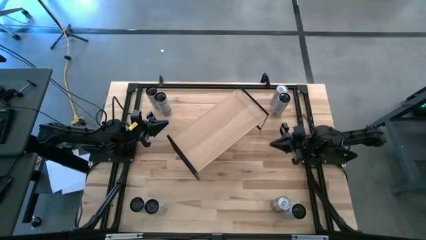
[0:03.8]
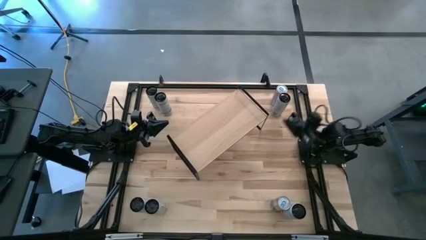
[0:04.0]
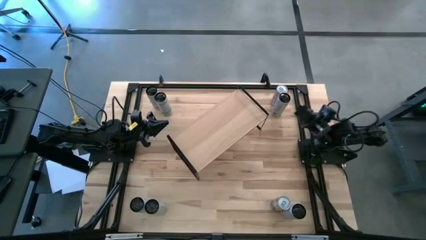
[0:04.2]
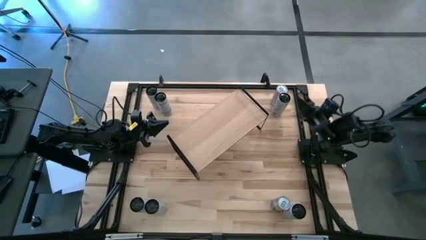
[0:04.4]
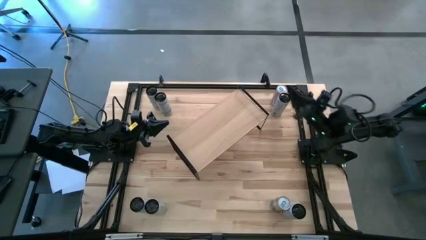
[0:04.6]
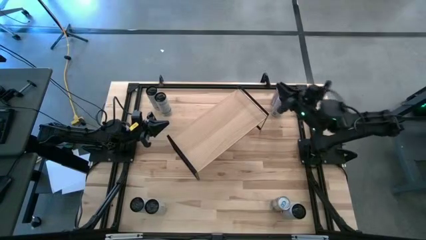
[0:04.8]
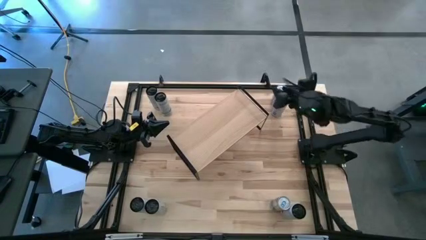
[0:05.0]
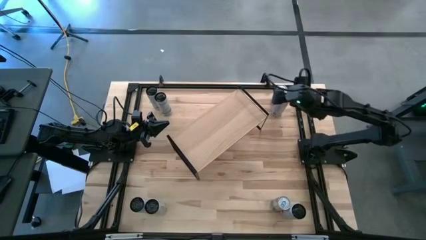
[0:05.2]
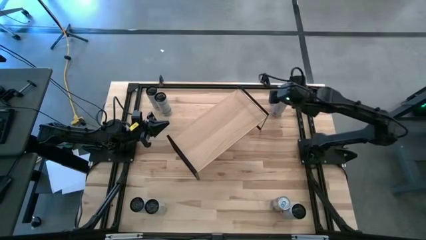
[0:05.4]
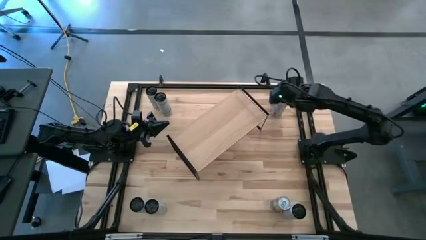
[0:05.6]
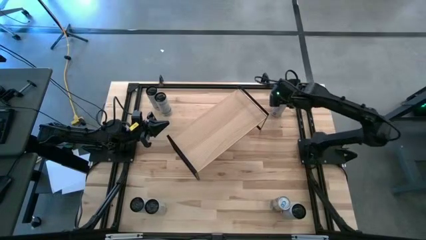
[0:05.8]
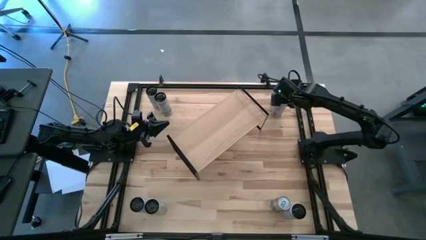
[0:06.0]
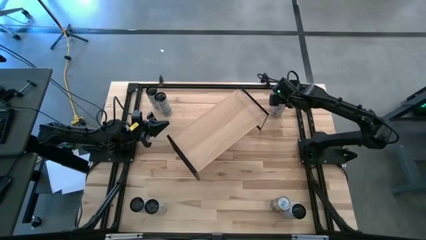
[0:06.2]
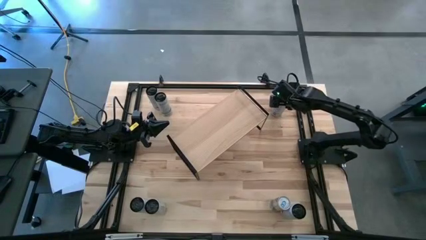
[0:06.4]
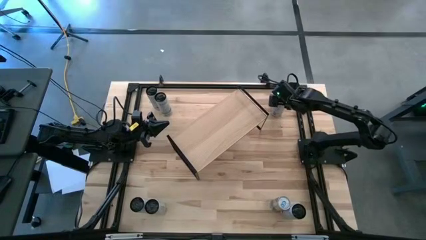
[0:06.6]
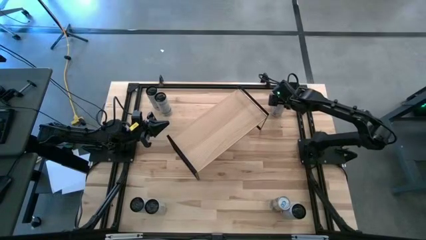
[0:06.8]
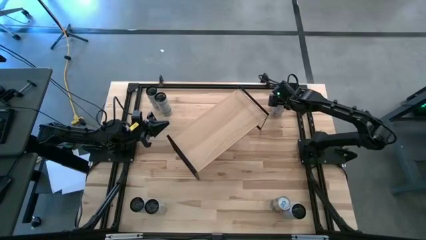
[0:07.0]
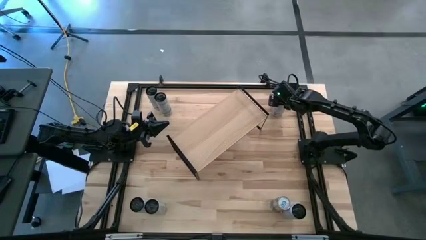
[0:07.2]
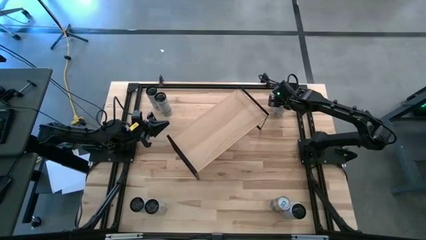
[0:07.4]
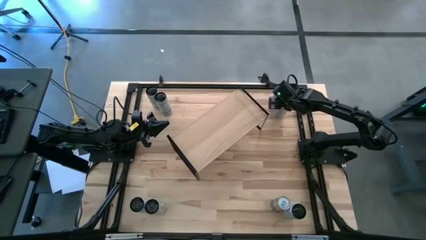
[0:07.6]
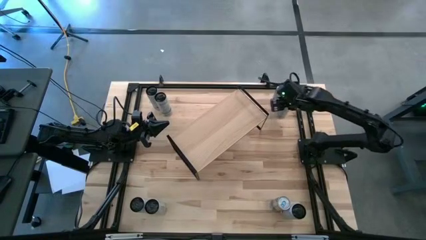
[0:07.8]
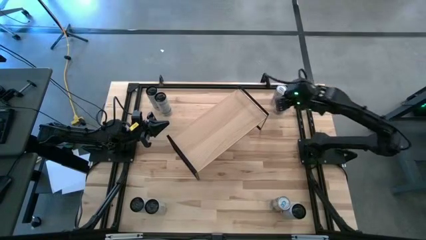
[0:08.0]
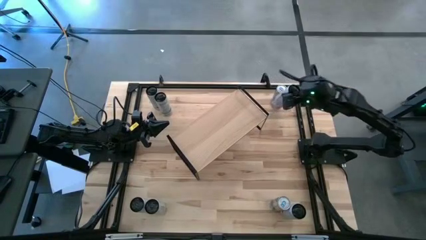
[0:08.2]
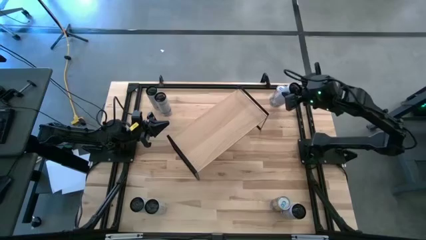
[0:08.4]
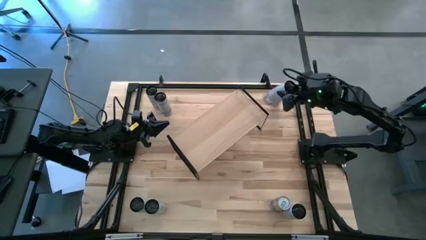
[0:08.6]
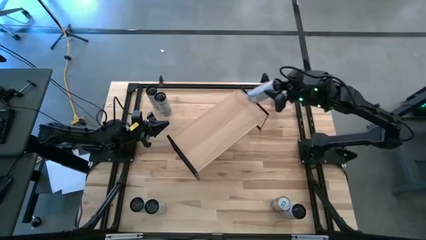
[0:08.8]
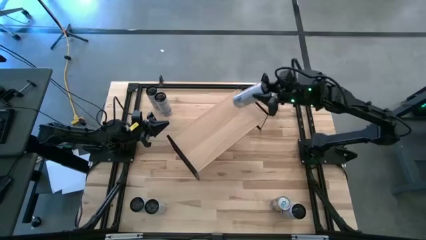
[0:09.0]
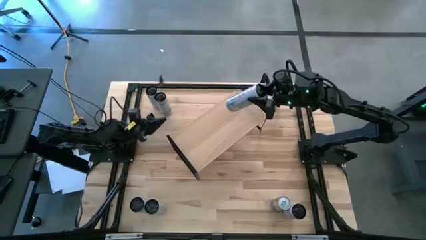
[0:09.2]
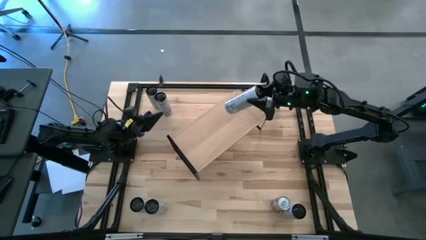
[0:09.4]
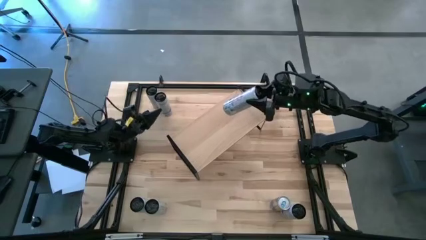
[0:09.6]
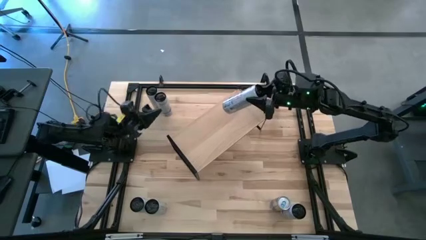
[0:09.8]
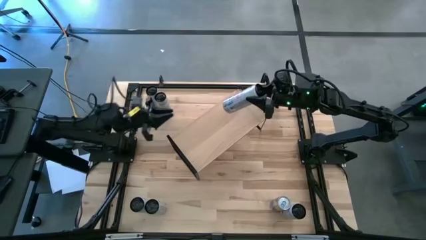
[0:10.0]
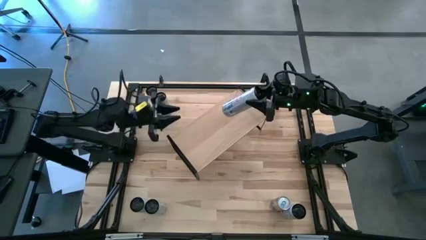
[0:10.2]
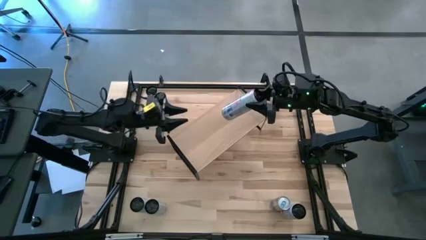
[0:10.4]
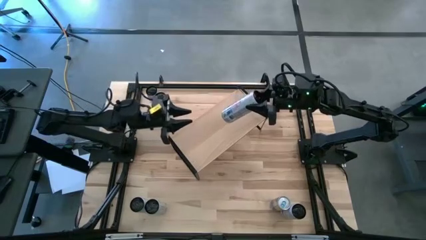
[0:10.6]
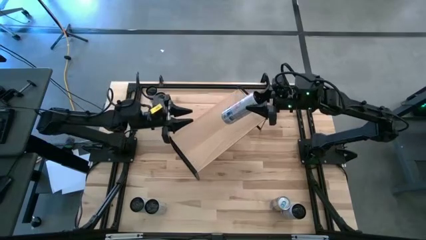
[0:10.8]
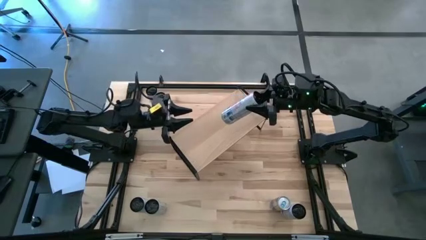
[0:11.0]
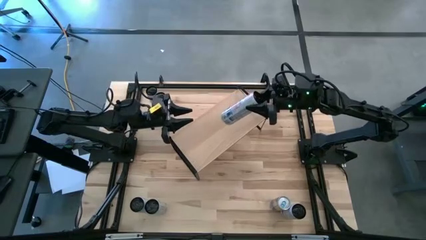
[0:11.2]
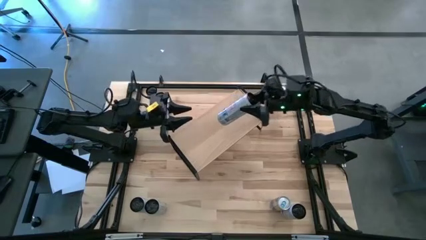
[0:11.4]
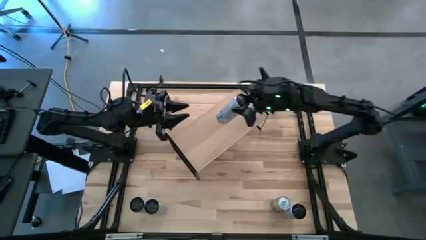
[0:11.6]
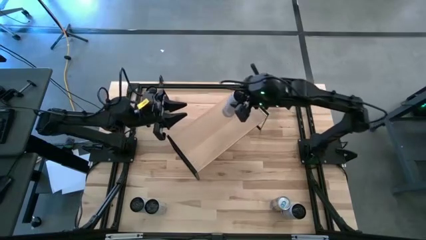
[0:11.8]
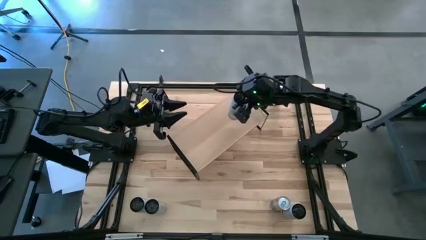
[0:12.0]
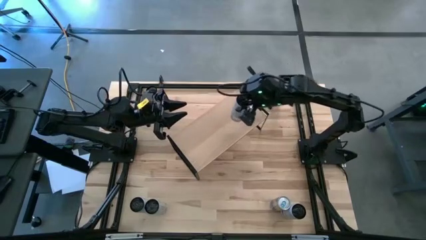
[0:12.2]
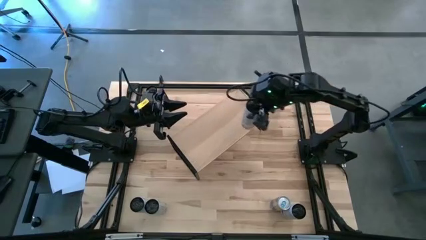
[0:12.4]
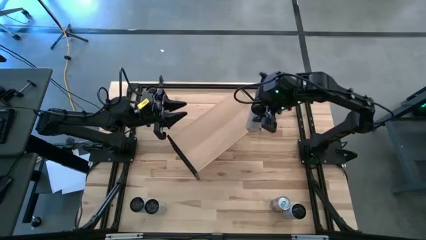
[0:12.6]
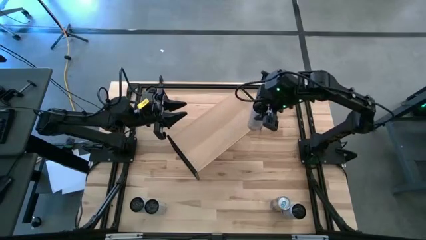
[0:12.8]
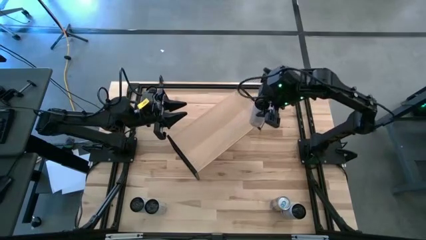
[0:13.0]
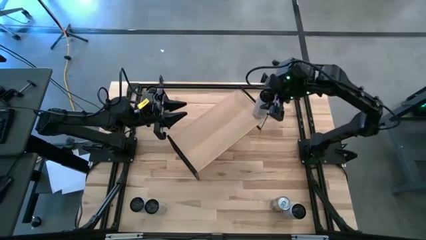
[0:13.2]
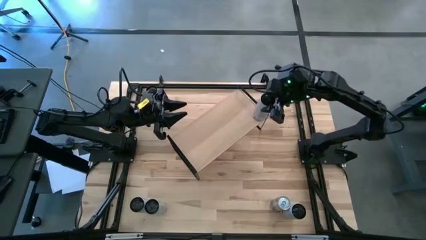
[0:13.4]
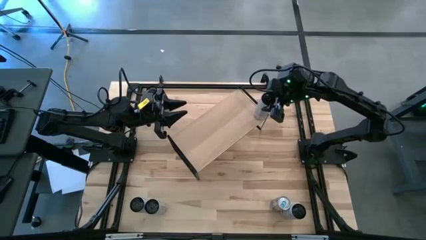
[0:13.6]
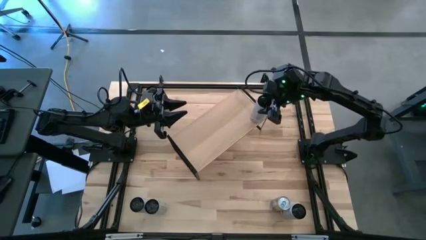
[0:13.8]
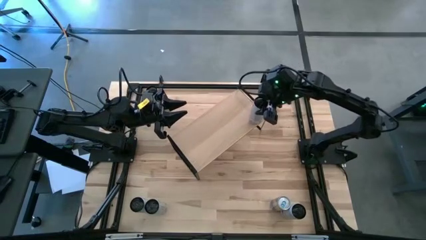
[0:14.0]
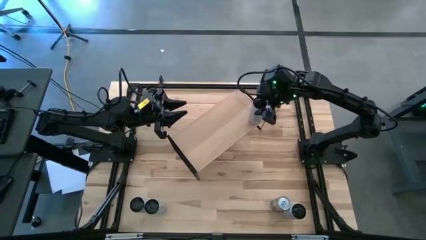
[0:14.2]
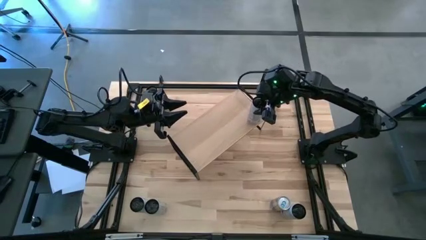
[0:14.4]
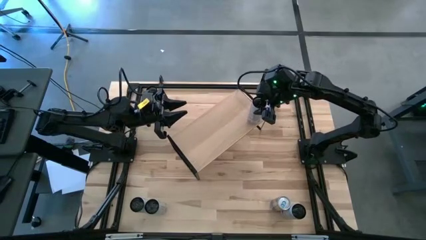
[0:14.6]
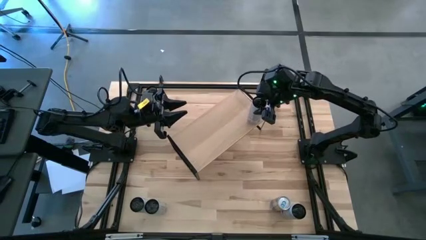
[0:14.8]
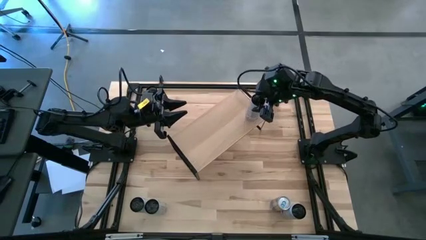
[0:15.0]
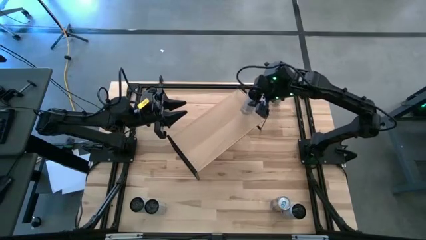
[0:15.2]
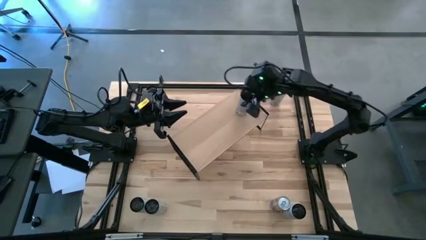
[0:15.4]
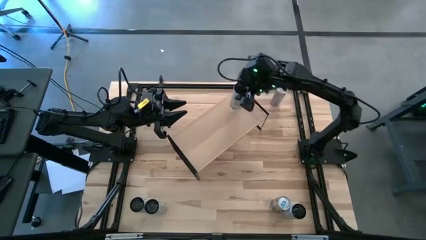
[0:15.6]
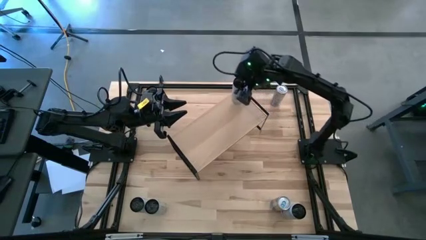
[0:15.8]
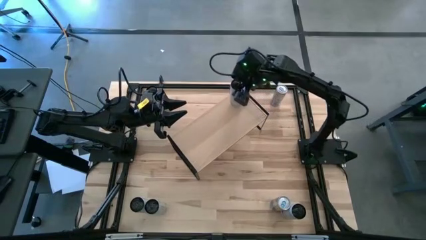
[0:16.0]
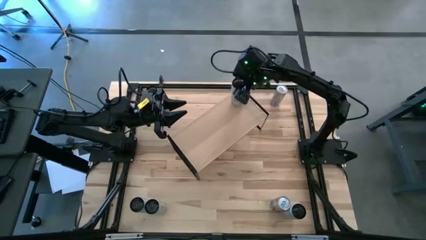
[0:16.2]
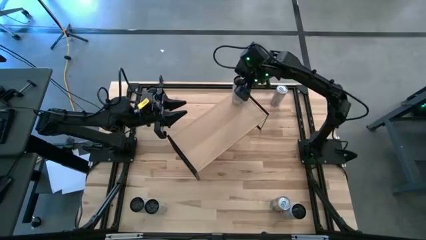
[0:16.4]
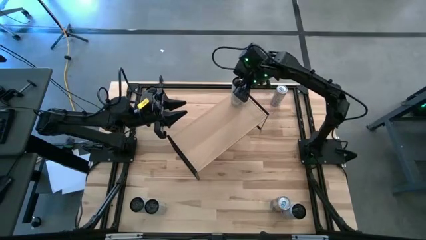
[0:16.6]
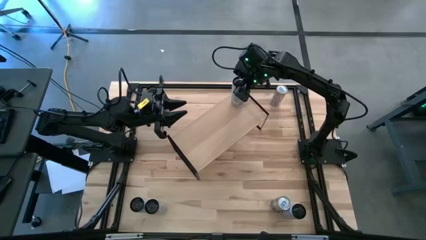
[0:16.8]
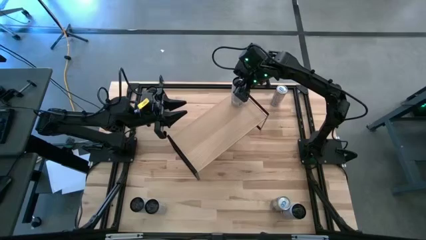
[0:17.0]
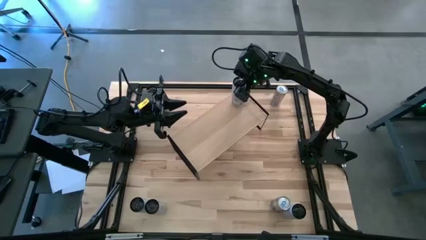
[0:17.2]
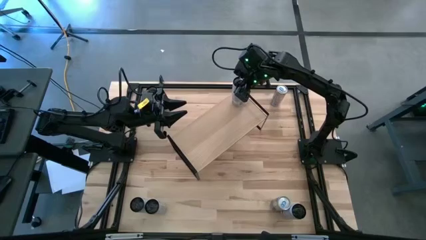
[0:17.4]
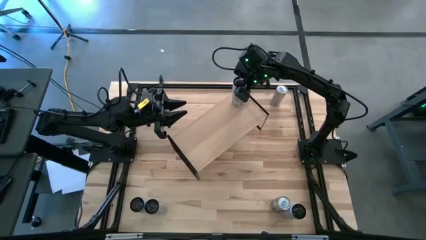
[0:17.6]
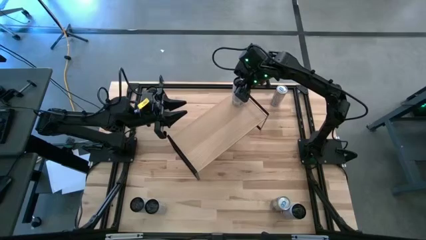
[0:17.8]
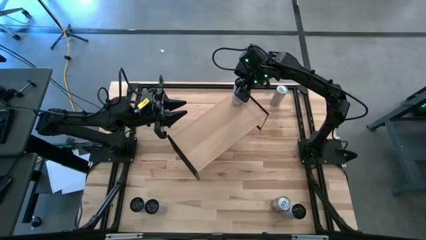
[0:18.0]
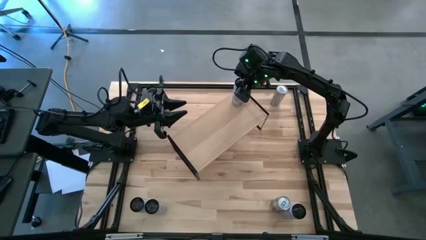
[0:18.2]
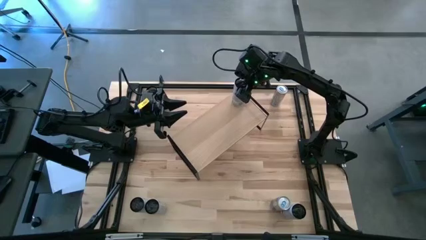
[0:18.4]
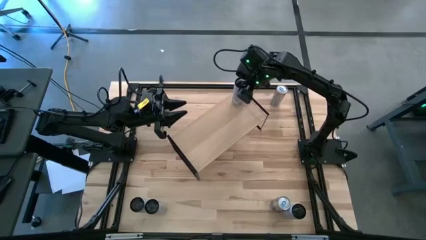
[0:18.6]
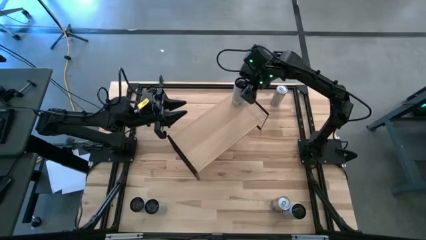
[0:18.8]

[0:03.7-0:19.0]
Task: Place canned beverage on shelf
Put the top white-yellow soda can on the shelf
